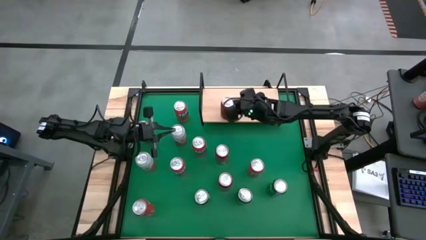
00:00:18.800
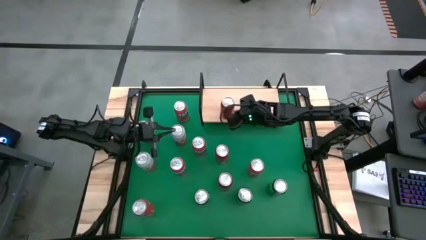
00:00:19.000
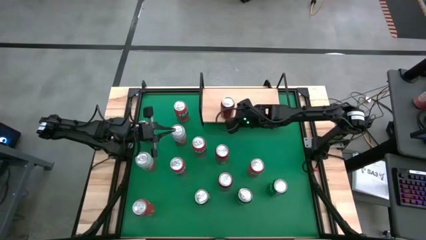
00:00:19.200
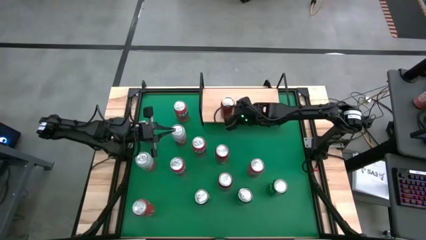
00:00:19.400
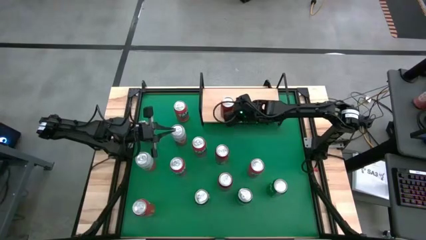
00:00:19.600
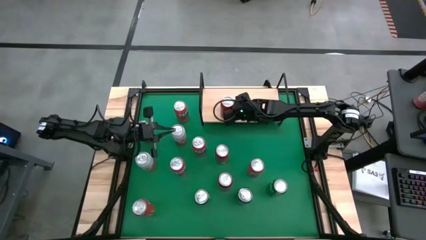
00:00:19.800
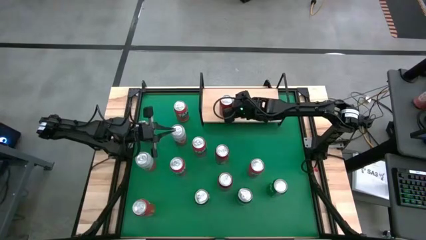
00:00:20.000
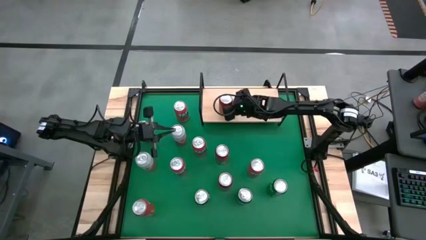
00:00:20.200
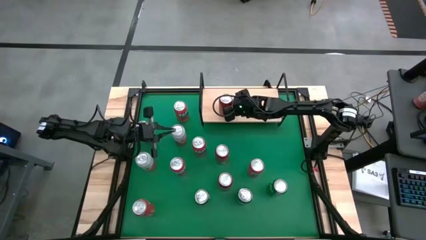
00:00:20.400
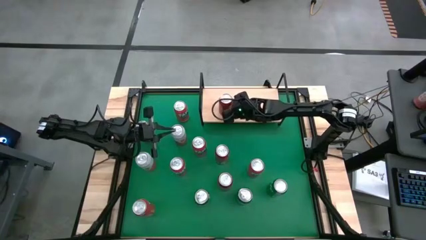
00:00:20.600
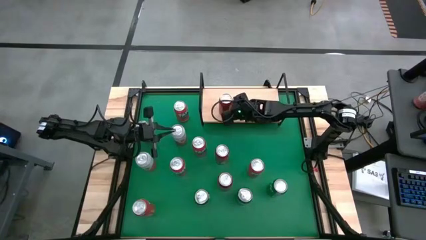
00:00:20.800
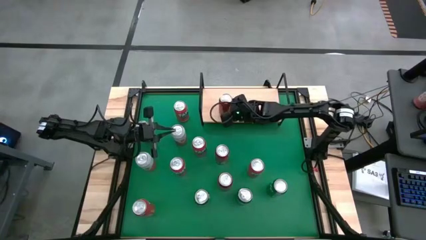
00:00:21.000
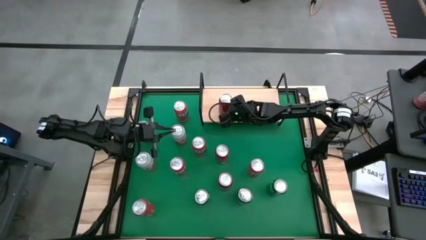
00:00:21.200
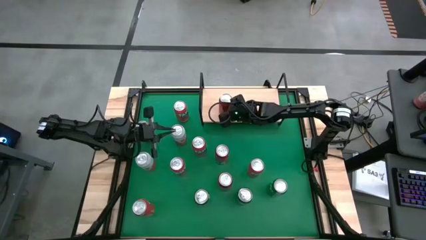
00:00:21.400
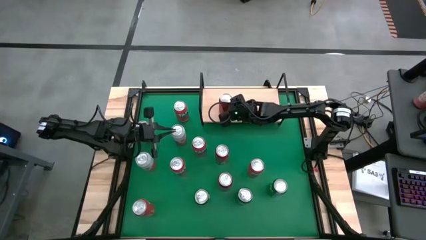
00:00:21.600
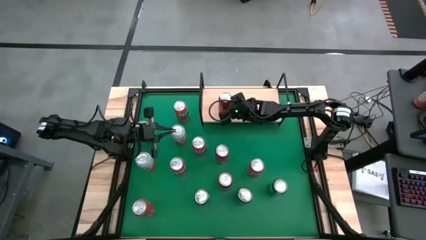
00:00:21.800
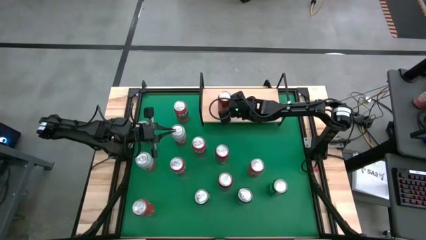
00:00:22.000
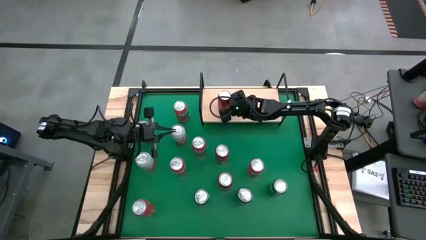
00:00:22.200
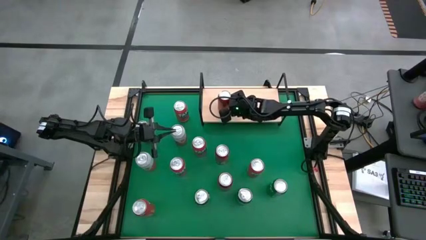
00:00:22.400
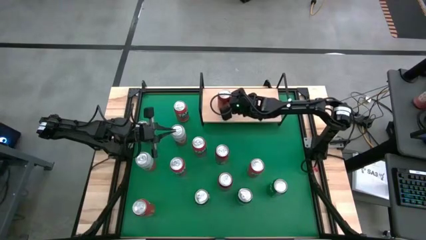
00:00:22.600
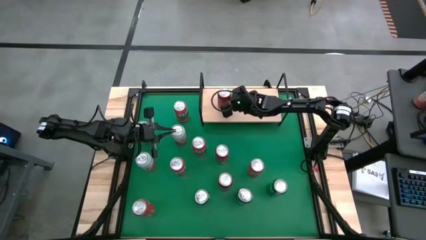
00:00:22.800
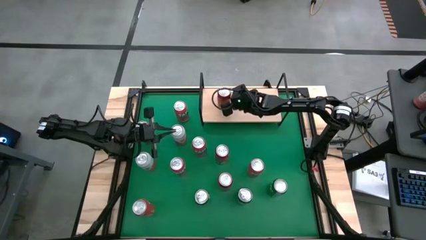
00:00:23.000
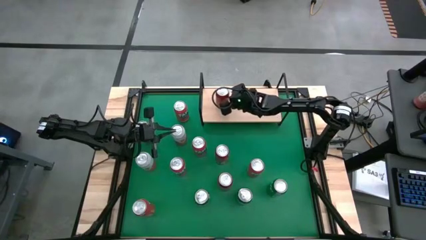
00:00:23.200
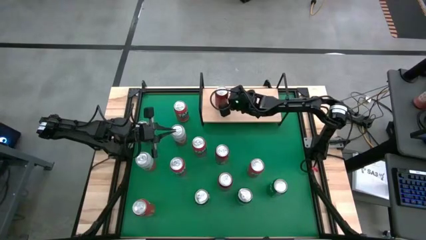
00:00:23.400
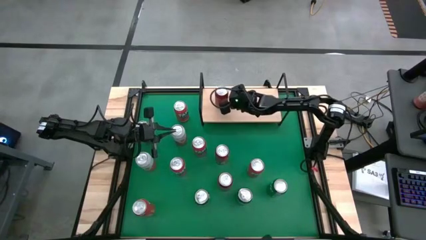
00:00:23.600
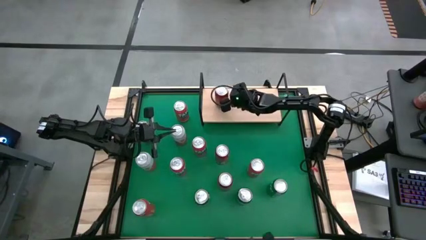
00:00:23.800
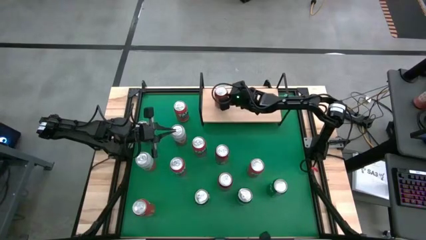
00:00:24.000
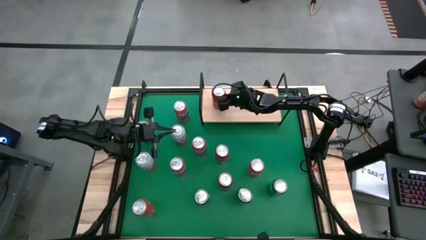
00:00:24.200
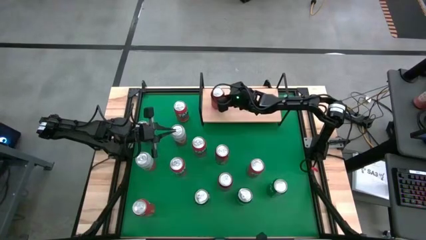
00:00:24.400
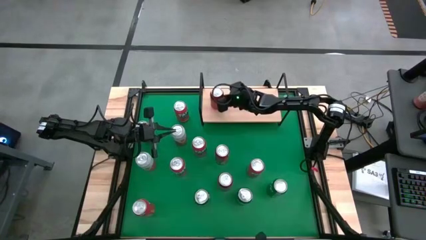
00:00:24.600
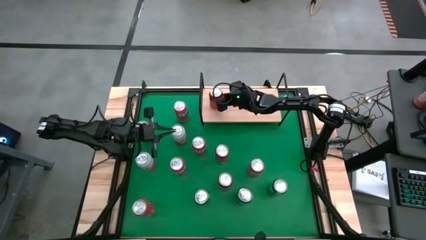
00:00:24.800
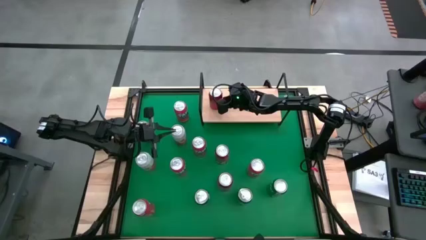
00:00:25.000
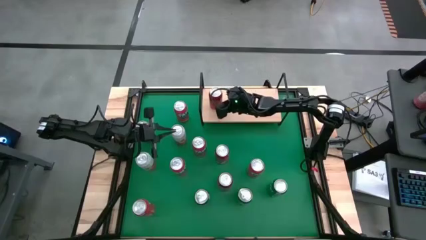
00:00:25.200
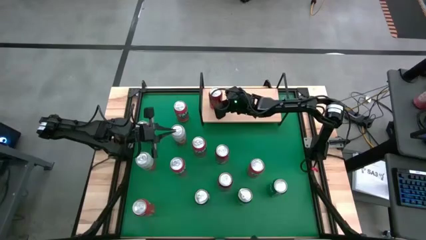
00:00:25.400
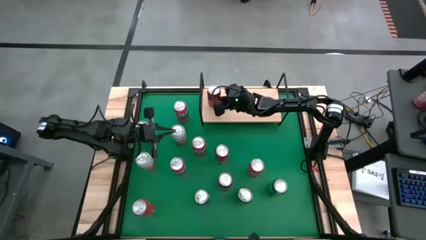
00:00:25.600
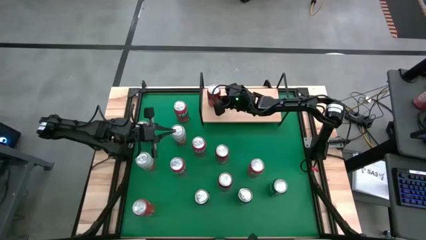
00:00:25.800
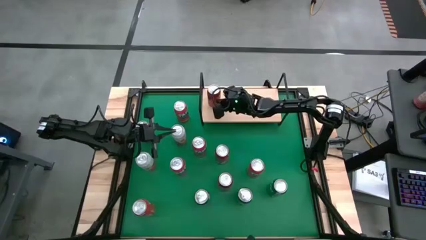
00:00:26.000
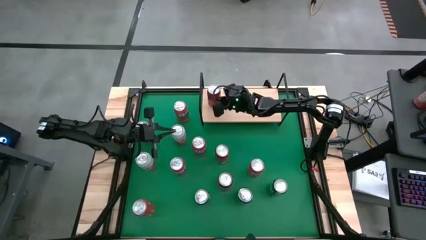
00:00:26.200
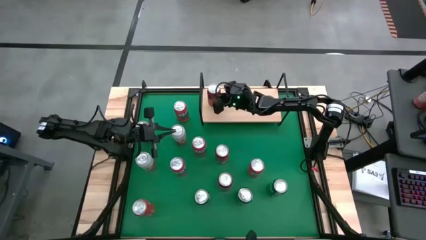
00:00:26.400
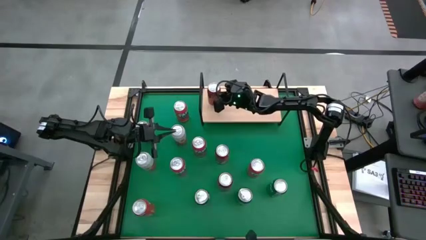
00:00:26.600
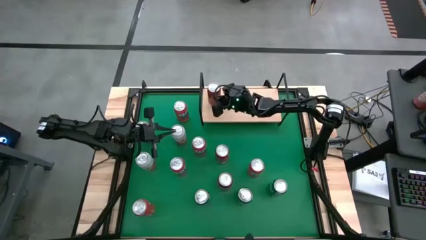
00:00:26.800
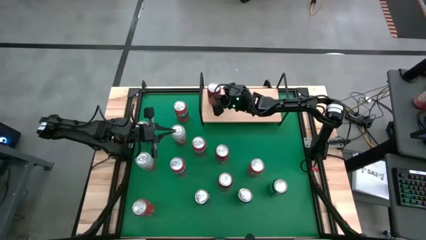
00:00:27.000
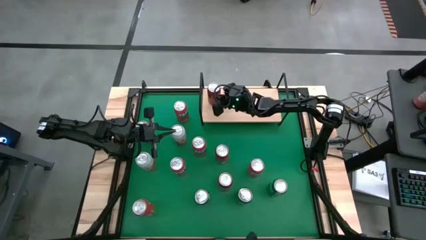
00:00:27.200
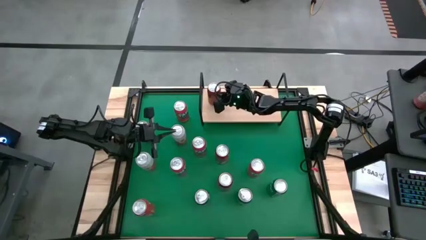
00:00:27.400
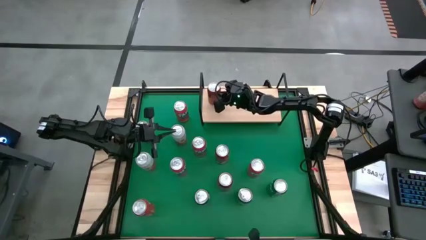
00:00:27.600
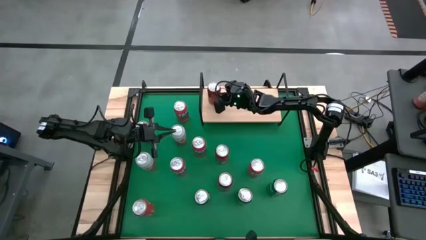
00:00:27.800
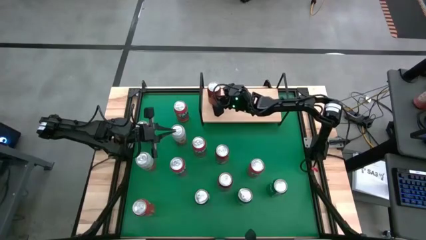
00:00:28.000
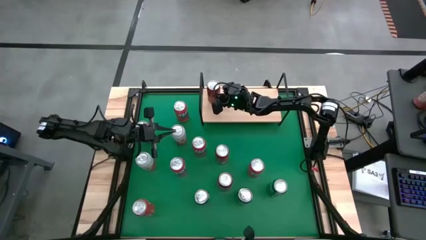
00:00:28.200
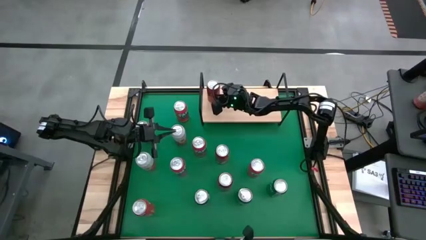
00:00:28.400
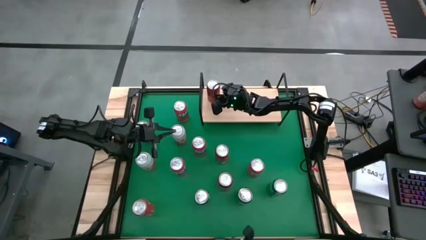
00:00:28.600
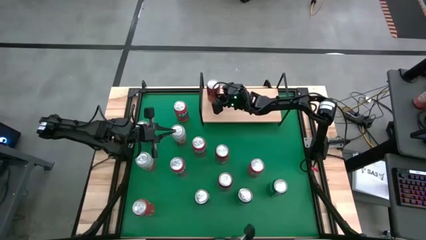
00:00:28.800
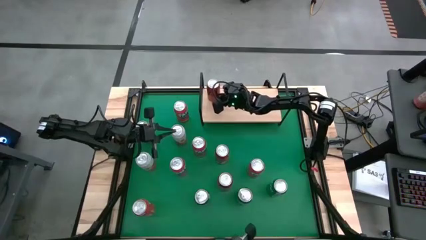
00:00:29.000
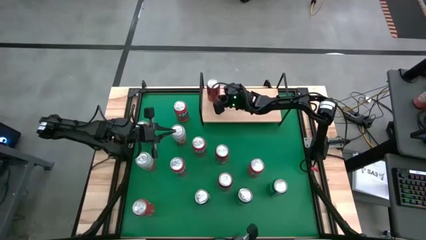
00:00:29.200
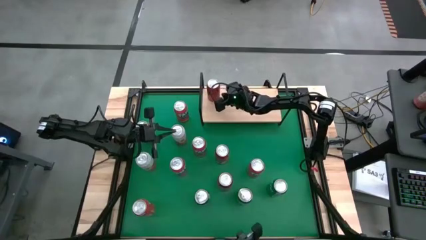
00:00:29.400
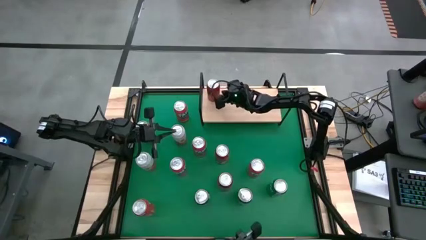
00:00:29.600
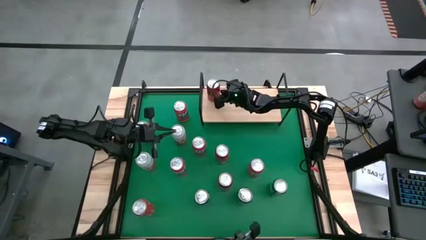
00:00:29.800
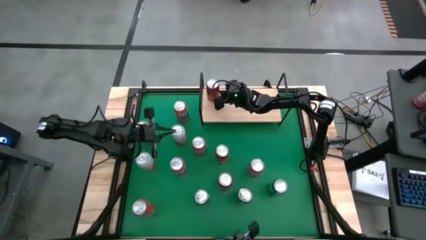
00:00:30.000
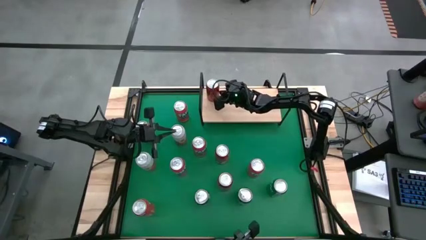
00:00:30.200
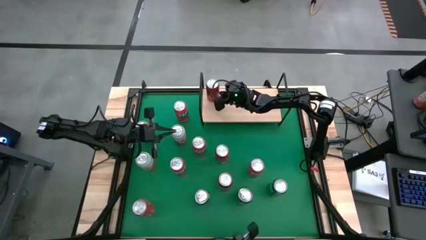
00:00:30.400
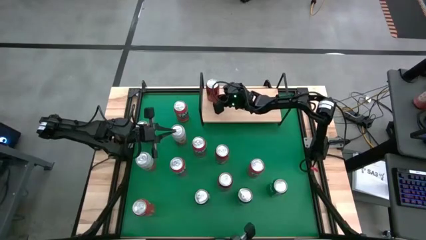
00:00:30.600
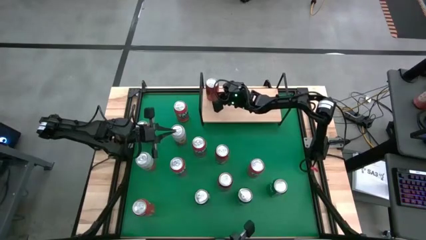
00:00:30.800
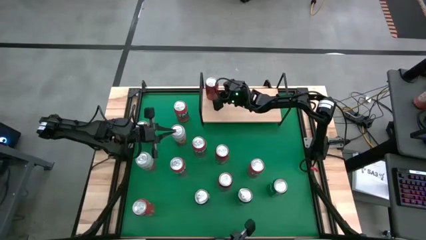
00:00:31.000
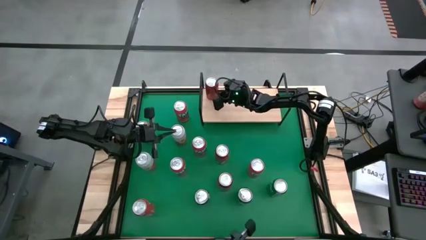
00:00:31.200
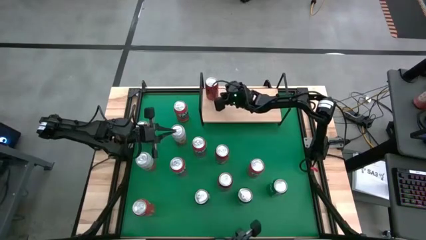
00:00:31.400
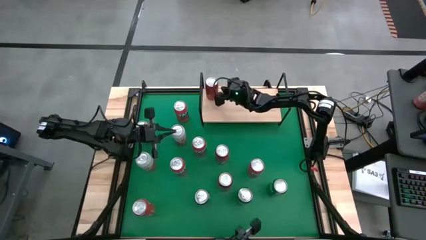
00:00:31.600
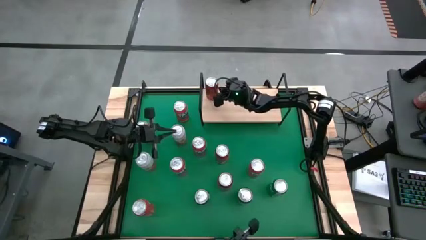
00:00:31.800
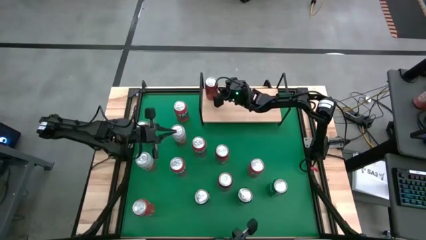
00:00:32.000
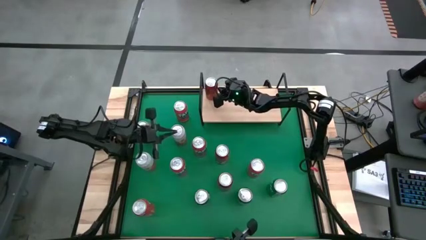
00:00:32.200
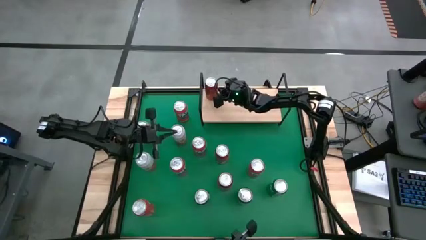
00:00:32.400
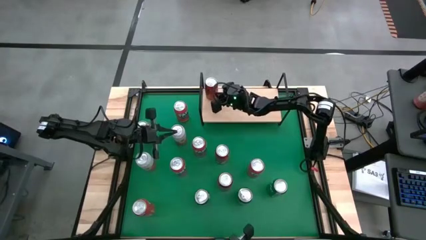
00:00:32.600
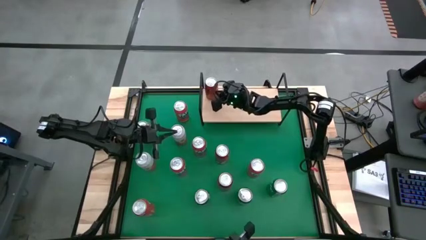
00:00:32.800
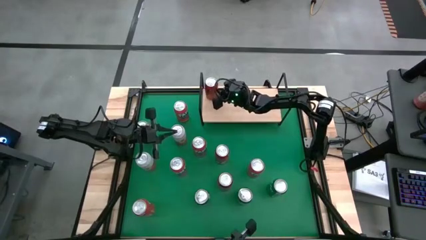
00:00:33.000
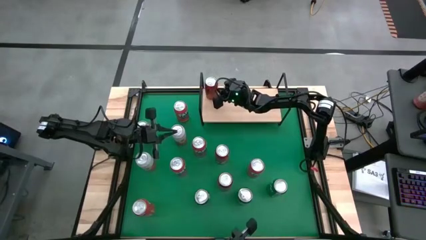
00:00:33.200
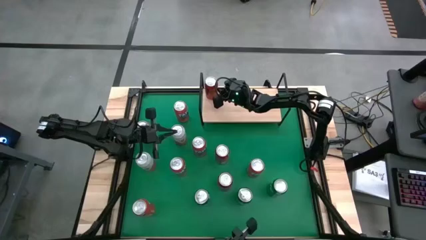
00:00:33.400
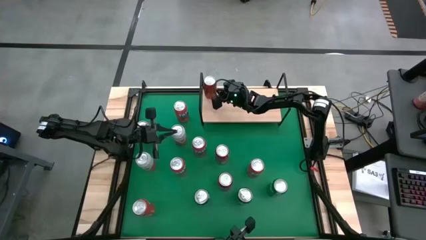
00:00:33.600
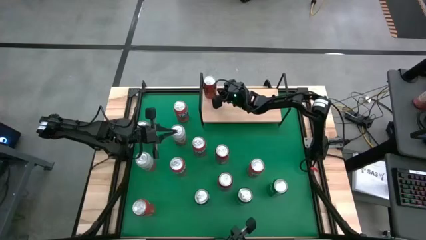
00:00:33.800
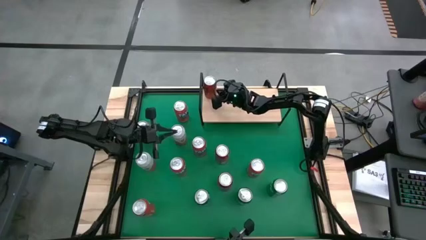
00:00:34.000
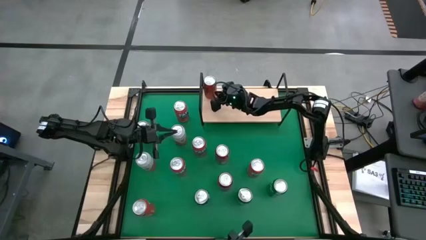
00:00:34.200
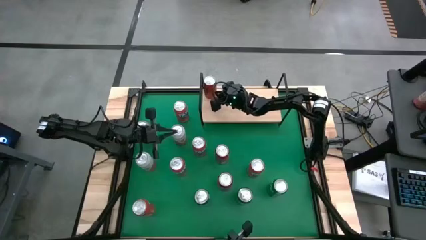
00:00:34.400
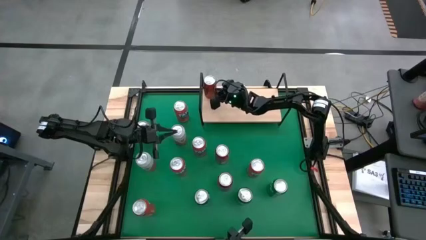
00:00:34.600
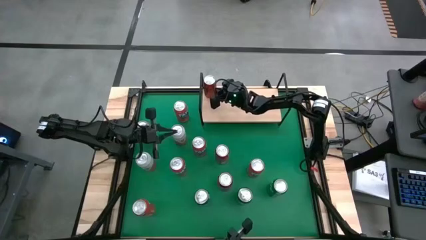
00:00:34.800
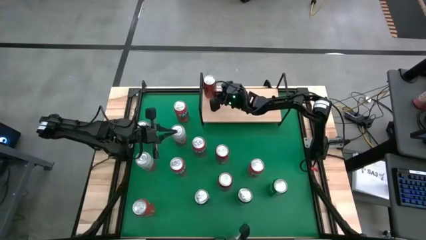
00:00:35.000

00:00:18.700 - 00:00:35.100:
Task: Place canned beverage on shelf
Put the red-black soda can on the shelf
